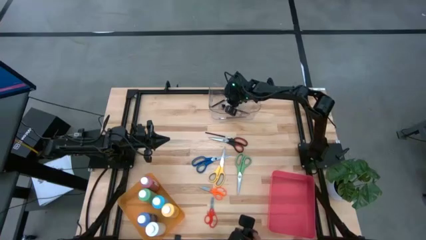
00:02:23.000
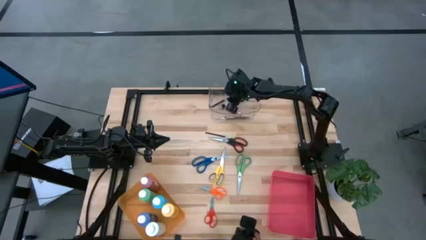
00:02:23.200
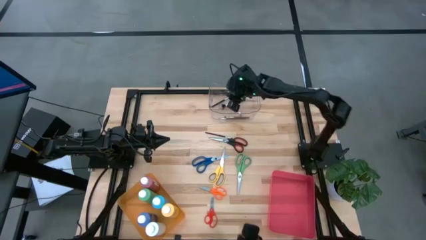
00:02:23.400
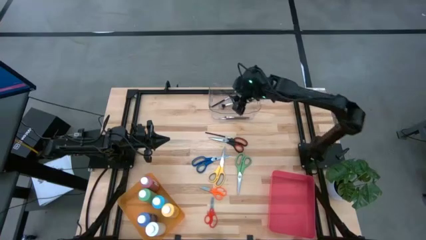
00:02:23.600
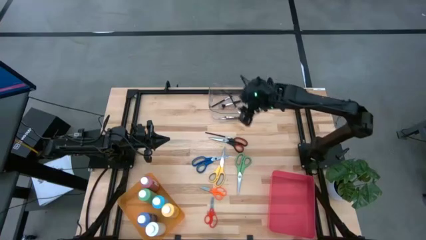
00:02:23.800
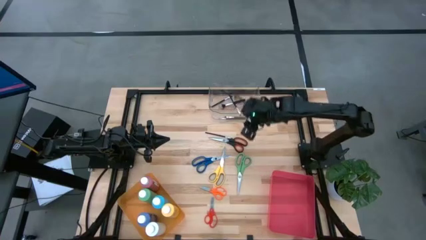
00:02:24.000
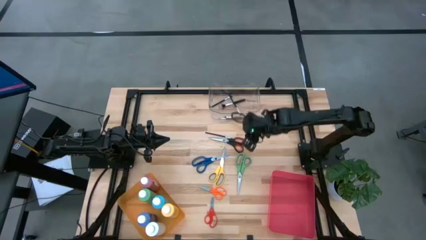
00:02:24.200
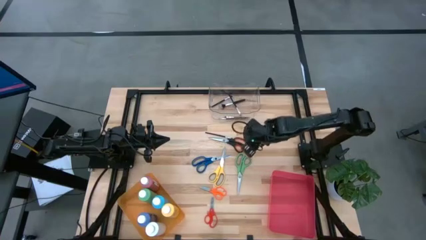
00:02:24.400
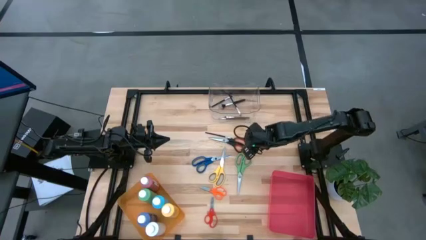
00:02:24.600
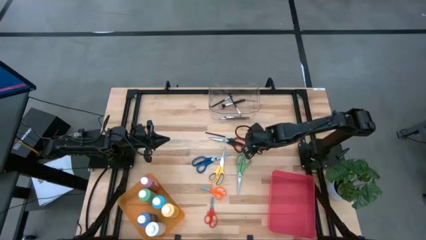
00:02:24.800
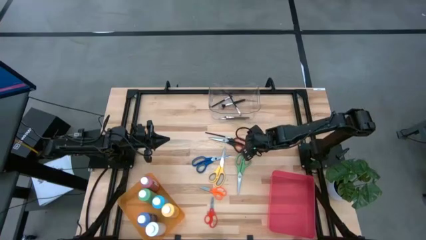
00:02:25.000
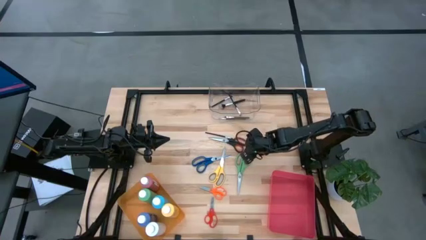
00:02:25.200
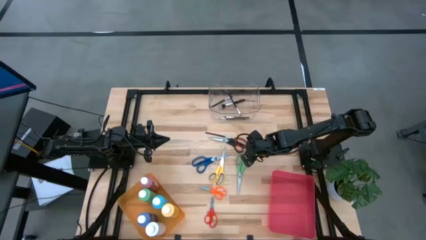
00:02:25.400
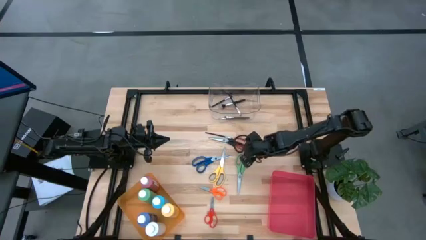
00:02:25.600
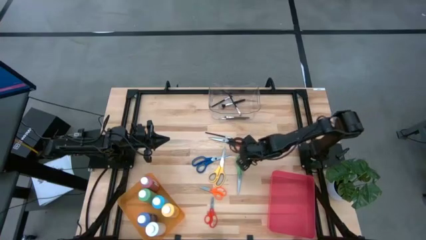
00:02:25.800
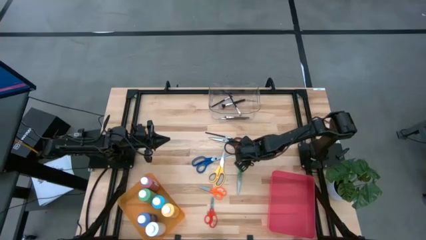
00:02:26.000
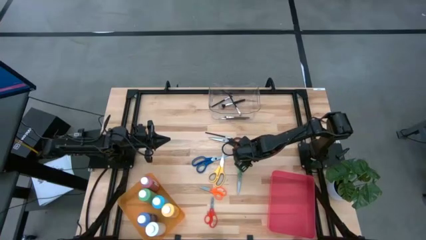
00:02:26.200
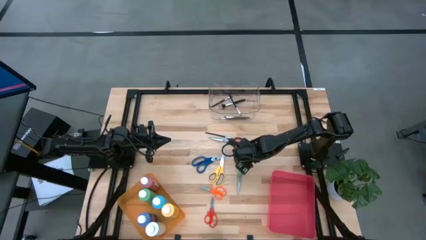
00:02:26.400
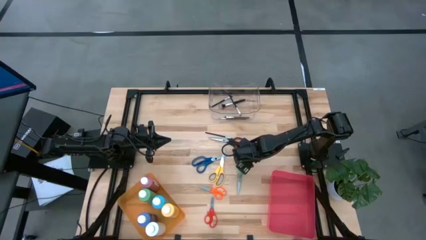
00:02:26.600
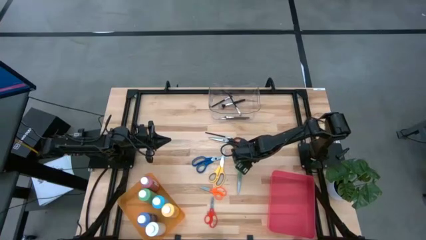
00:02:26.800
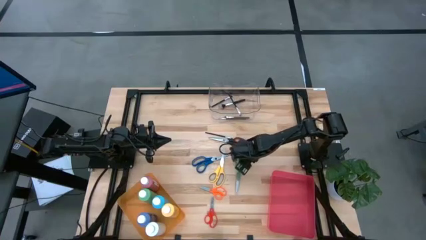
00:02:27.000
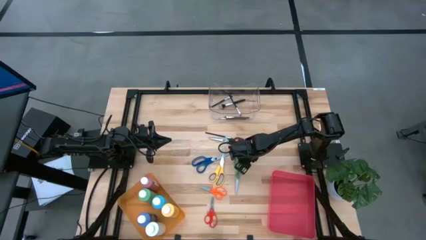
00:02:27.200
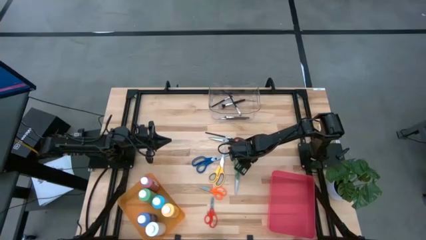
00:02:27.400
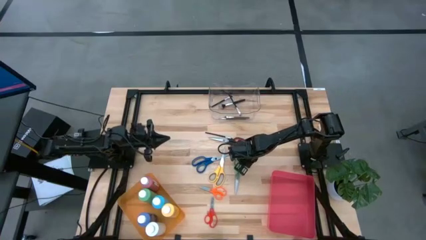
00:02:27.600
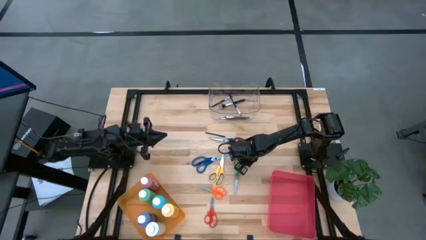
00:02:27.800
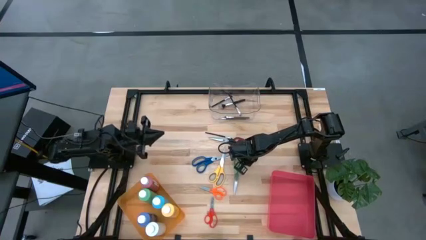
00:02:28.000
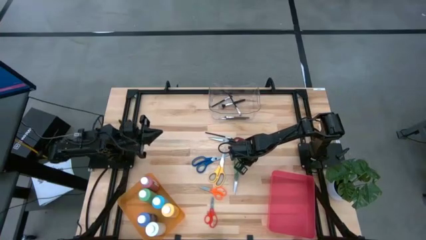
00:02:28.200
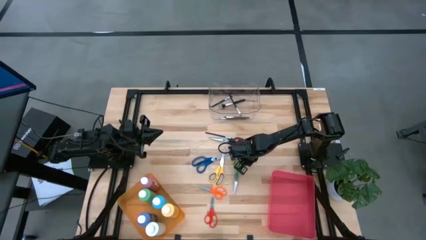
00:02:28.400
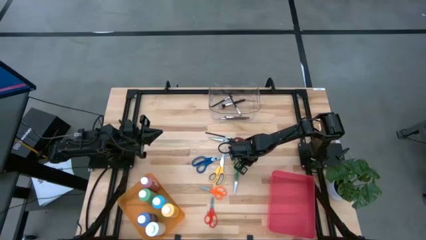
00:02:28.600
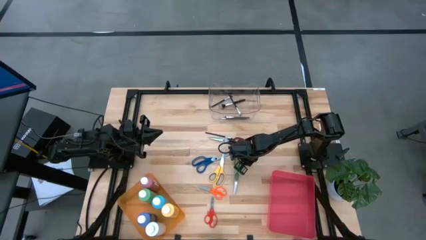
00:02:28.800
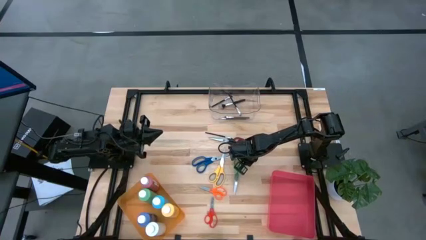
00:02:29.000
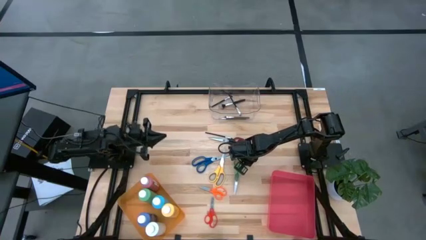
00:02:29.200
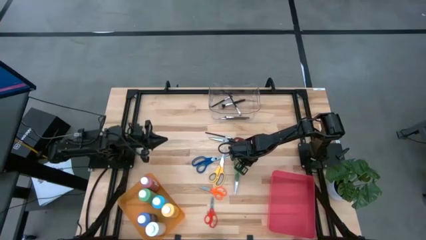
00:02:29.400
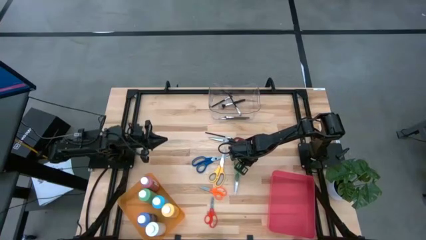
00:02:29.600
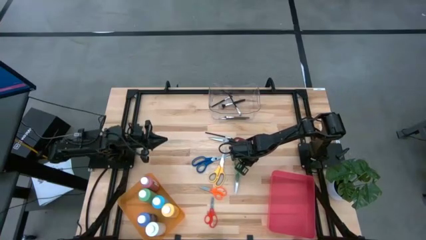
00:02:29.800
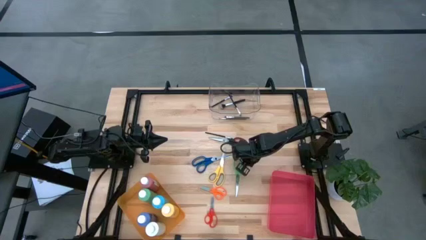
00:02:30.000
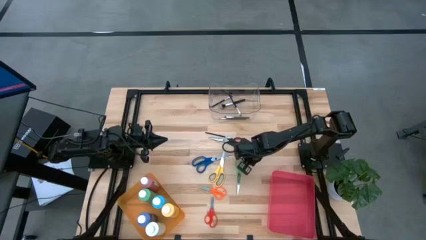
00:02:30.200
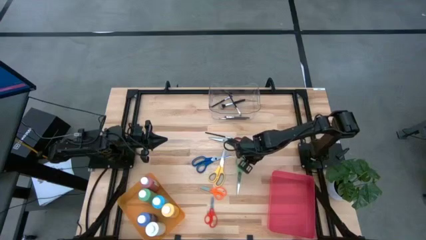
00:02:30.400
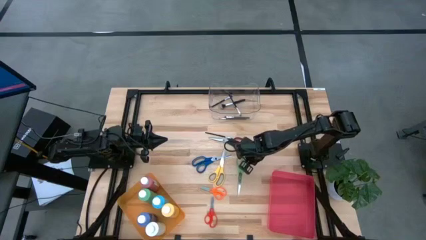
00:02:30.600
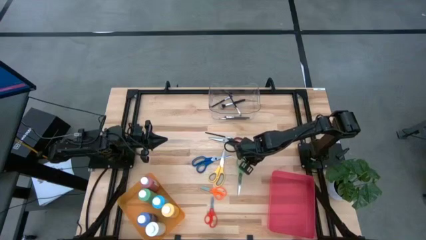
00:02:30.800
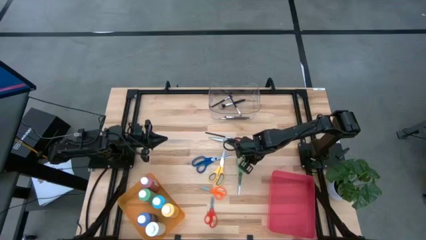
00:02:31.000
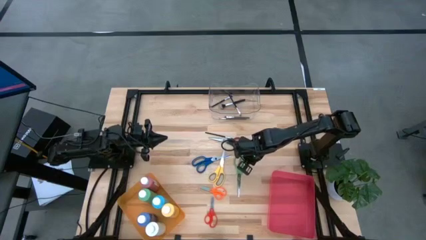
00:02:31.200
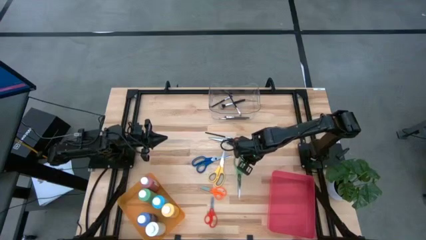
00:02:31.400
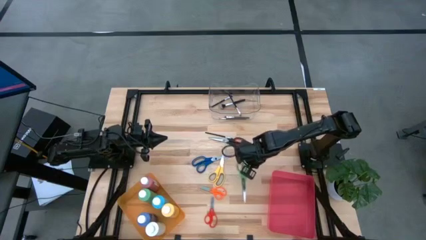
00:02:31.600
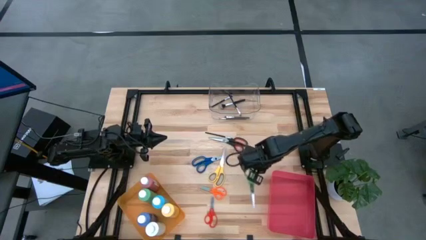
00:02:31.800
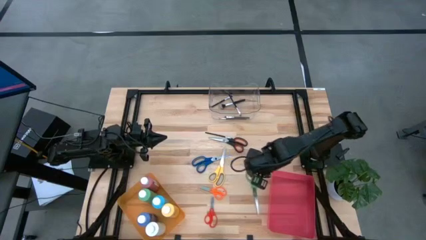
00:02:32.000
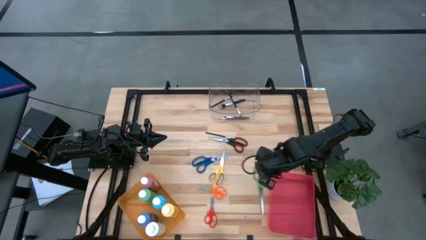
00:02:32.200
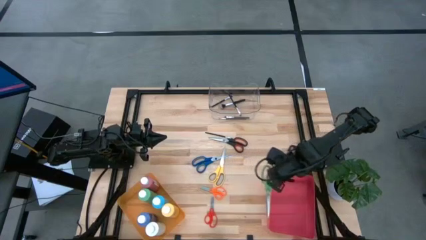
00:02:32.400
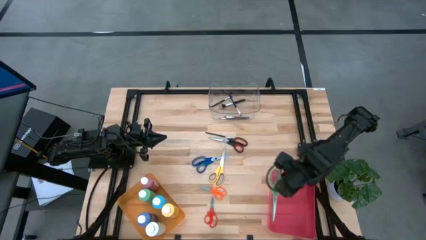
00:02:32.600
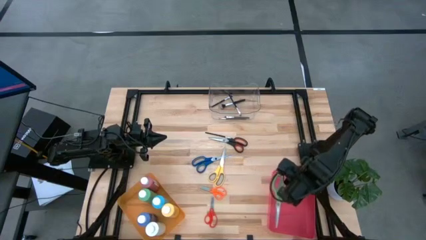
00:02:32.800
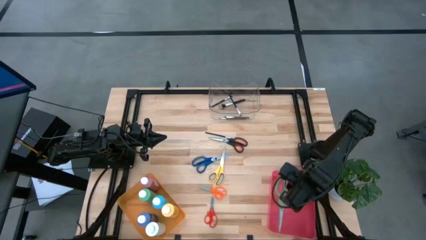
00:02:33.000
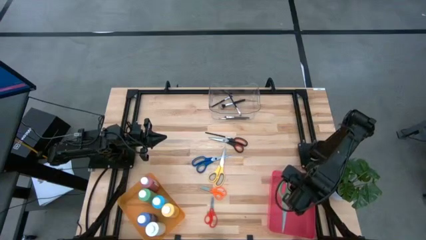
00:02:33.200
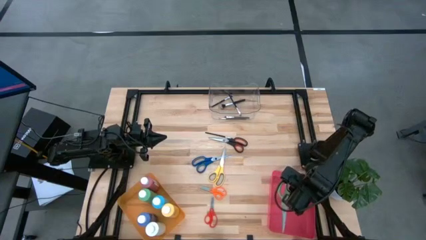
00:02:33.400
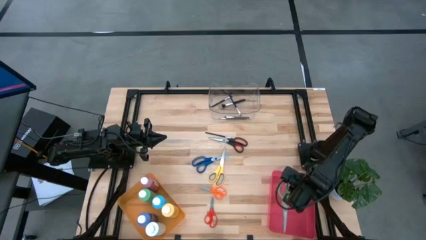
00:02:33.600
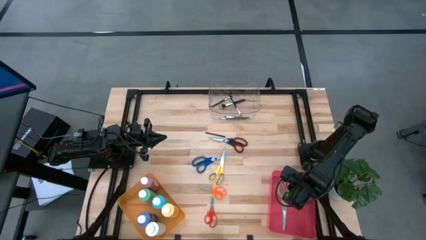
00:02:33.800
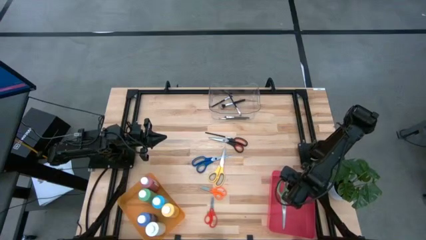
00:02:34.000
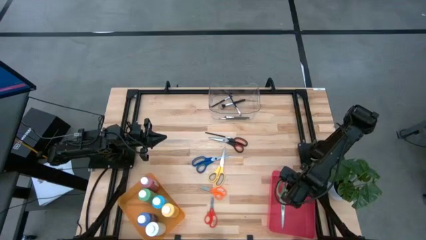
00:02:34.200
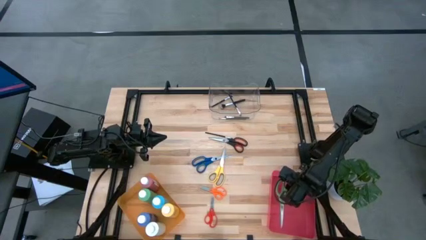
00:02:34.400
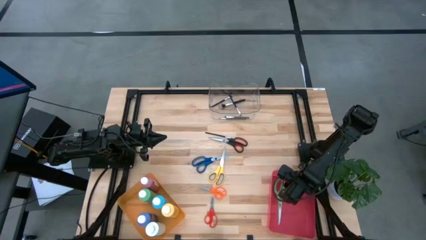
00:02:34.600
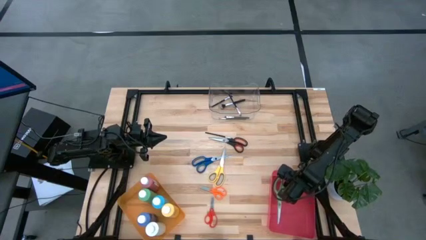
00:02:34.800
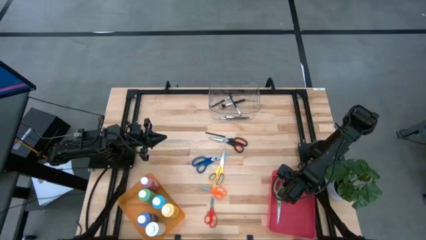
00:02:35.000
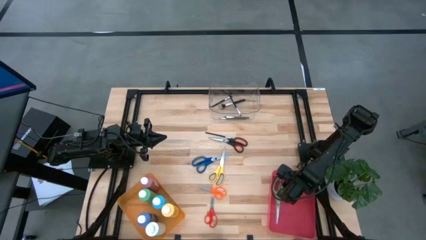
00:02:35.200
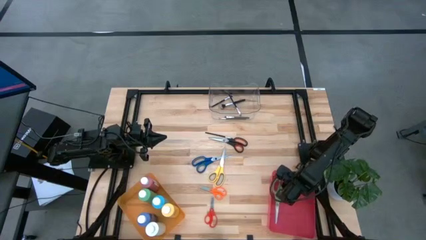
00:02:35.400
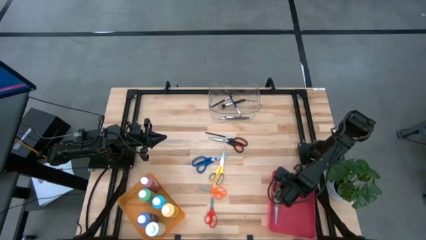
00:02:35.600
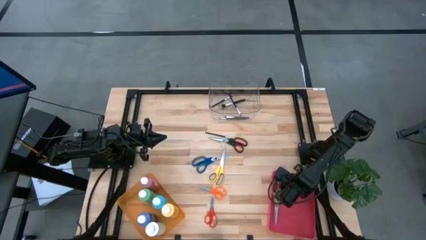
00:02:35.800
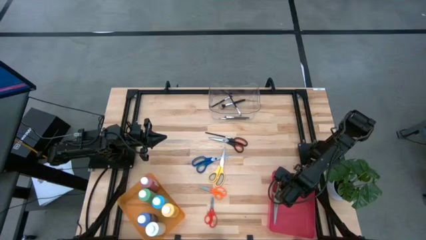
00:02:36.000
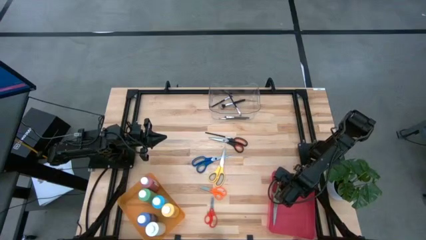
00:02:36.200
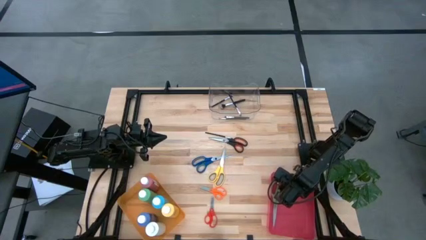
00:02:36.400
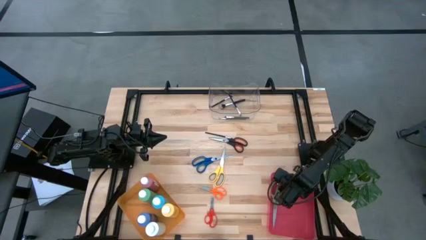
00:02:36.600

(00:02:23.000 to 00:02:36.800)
Task: Pick & Place Paint Supplies
Put the green scissor into the red bin

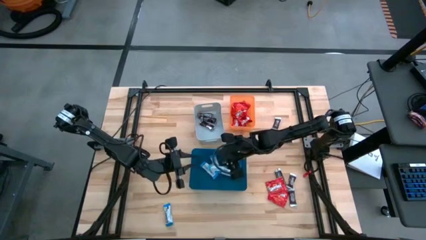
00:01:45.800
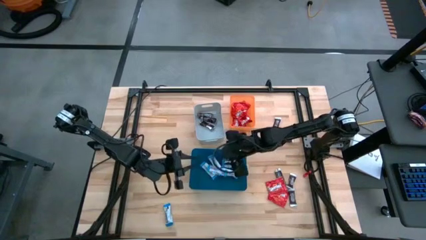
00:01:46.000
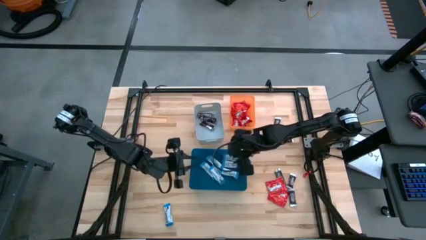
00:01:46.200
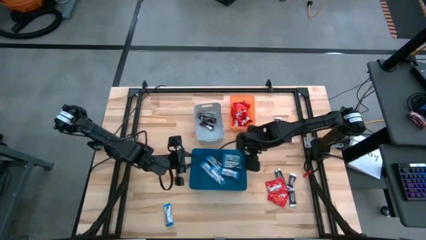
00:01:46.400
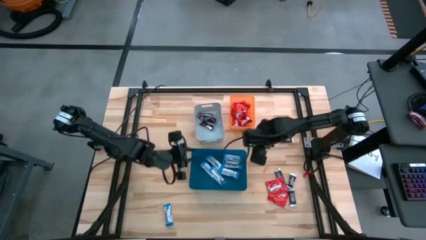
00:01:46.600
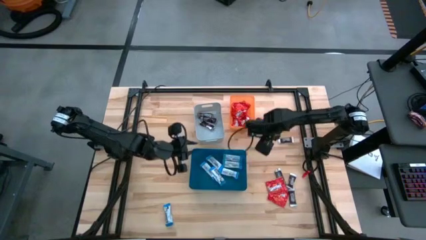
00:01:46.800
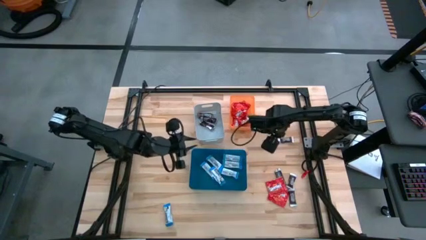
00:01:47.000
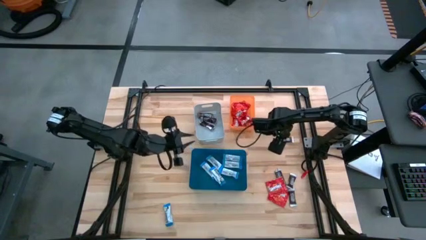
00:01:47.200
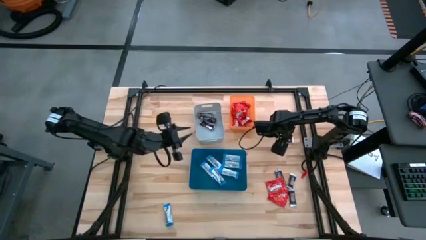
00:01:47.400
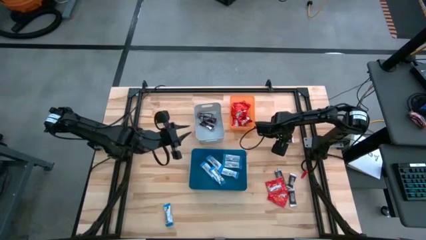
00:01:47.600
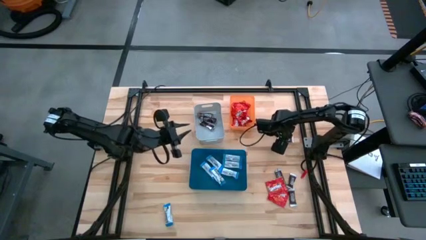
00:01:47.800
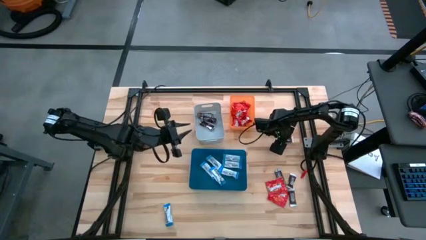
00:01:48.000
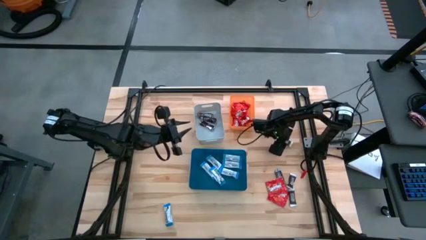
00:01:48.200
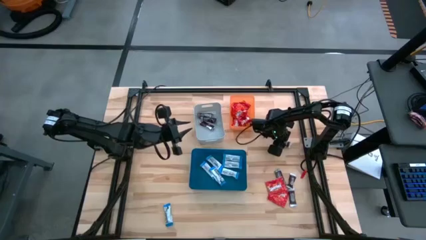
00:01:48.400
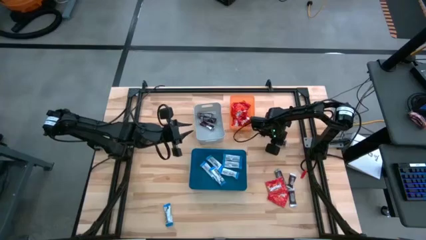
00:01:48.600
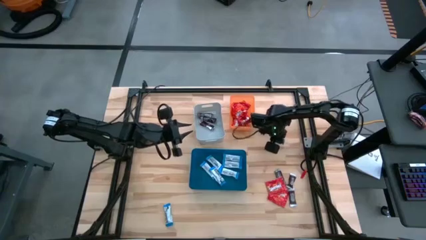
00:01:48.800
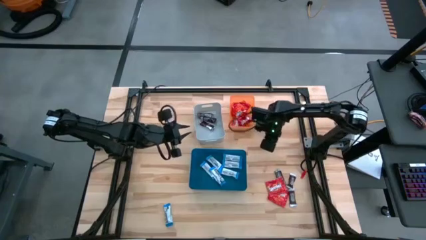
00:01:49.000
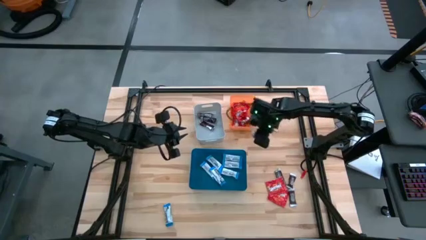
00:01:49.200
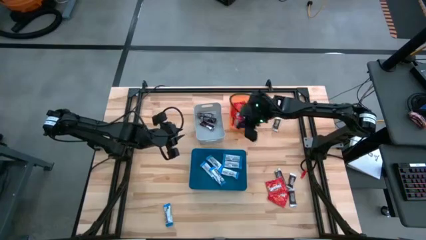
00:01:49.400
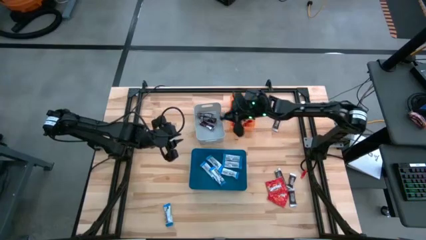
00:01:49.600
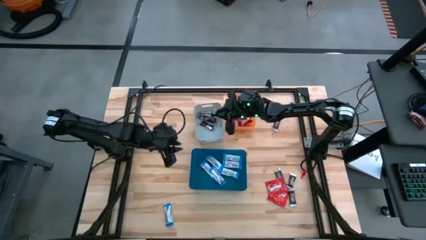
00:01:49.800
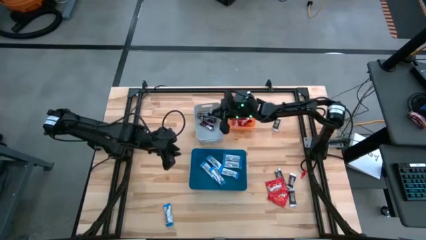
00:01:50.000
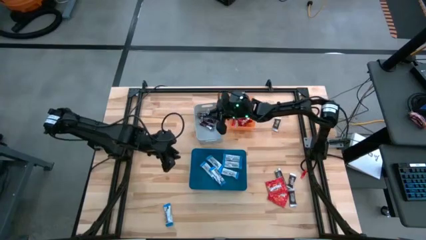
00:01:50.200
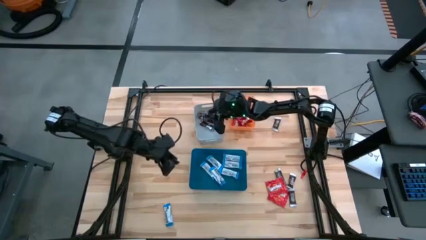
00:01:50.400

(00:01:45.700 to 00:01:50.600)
Task: Sort candy
Put the brown chocolate bar into the gray bin
